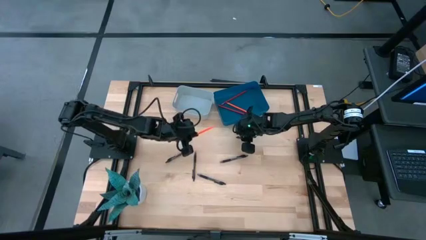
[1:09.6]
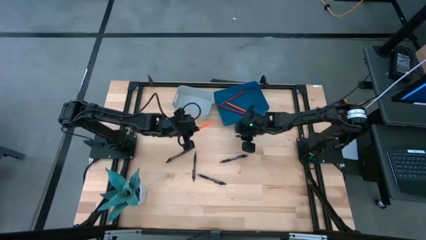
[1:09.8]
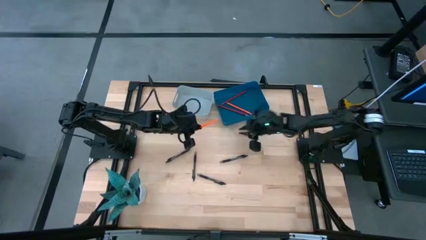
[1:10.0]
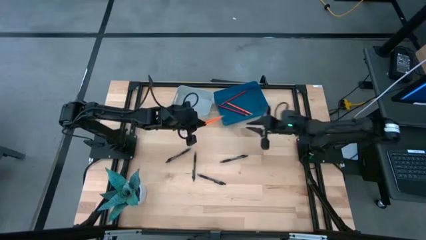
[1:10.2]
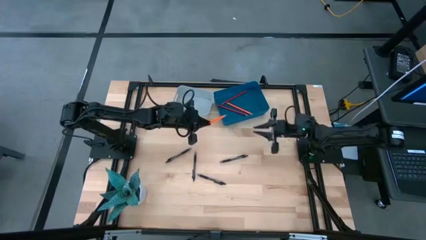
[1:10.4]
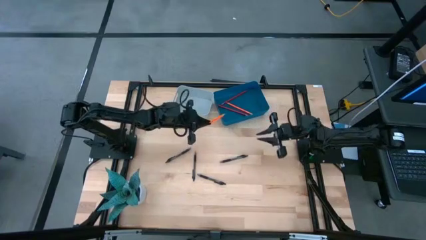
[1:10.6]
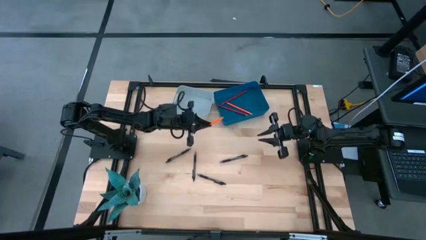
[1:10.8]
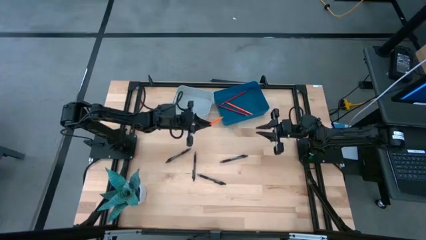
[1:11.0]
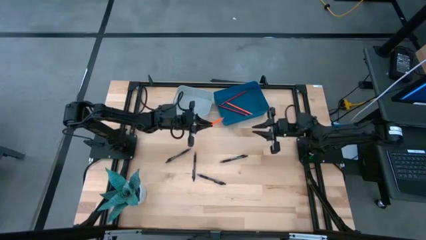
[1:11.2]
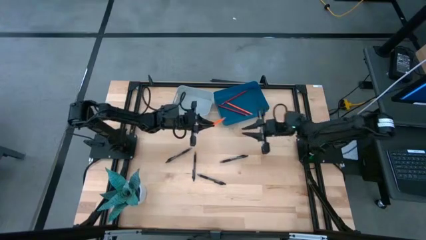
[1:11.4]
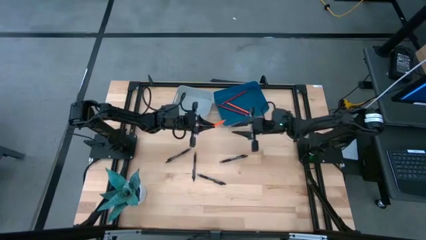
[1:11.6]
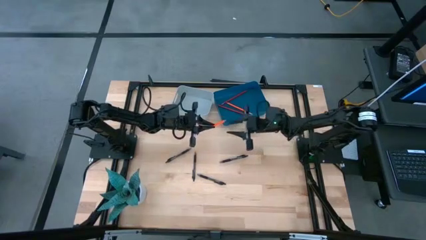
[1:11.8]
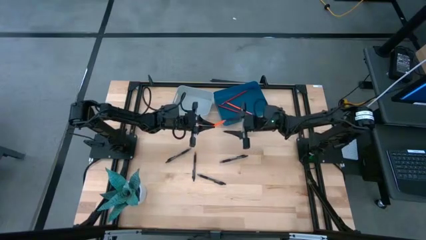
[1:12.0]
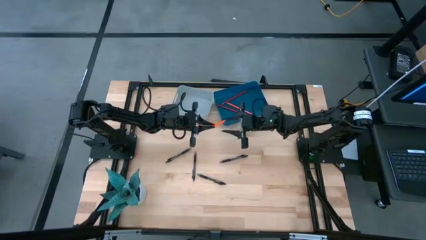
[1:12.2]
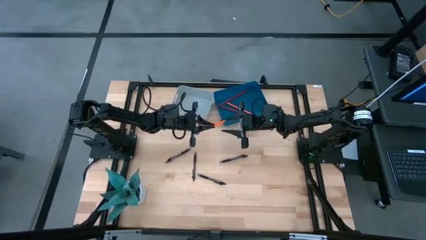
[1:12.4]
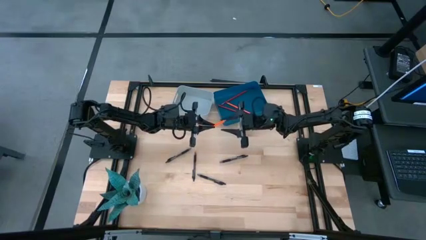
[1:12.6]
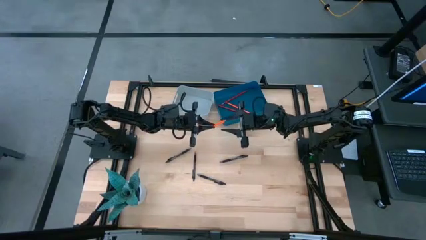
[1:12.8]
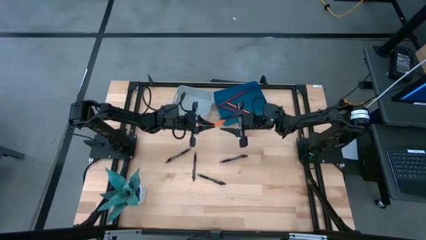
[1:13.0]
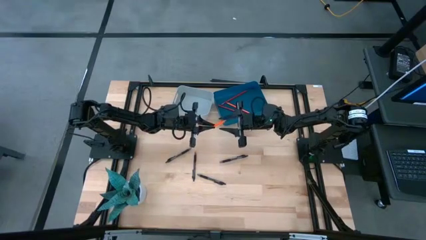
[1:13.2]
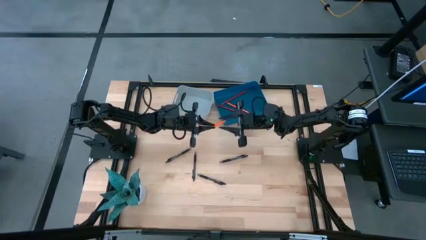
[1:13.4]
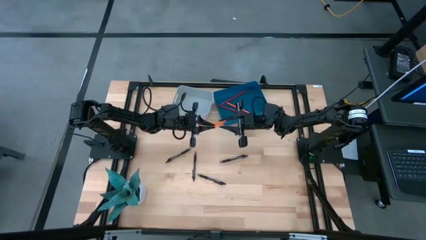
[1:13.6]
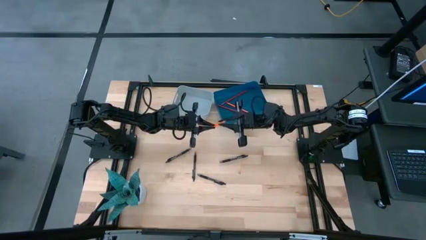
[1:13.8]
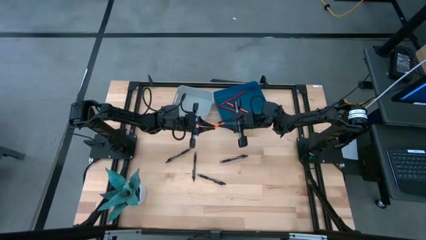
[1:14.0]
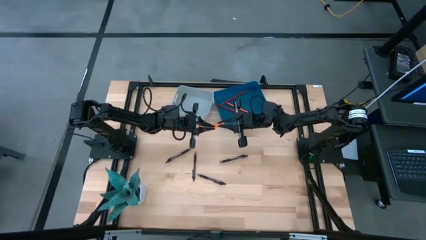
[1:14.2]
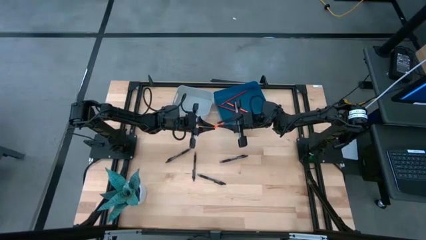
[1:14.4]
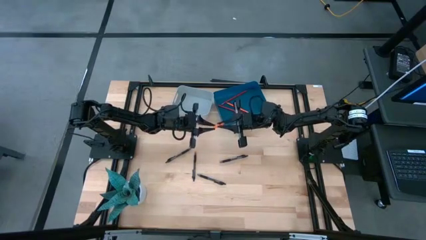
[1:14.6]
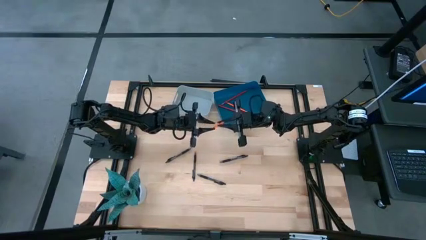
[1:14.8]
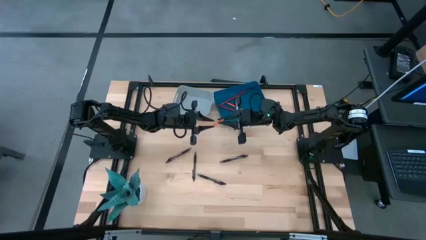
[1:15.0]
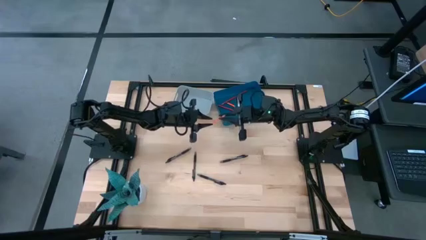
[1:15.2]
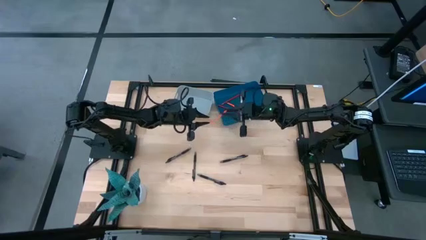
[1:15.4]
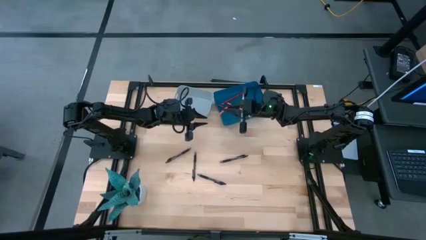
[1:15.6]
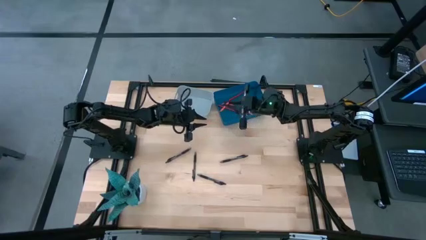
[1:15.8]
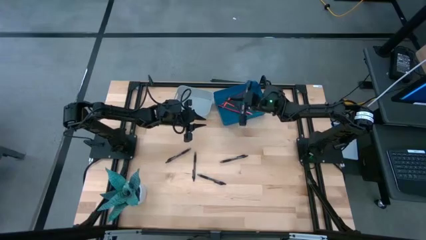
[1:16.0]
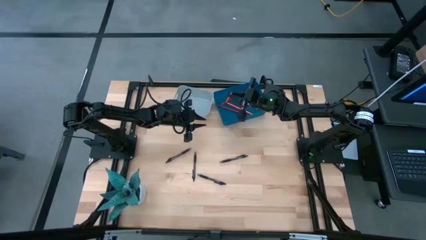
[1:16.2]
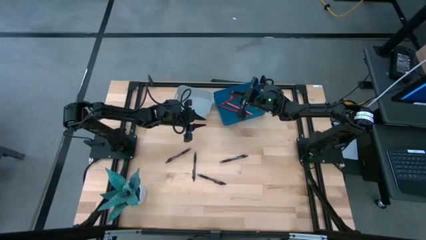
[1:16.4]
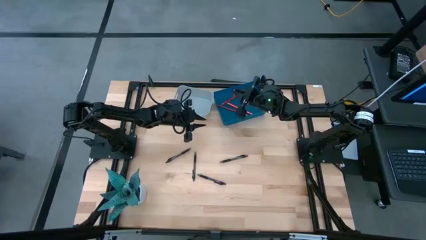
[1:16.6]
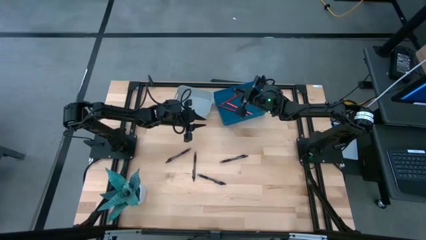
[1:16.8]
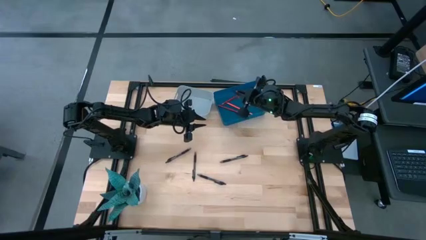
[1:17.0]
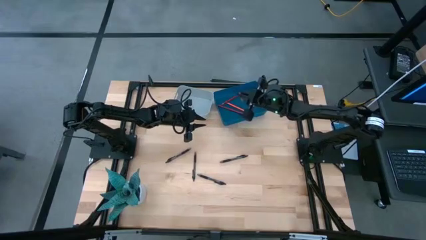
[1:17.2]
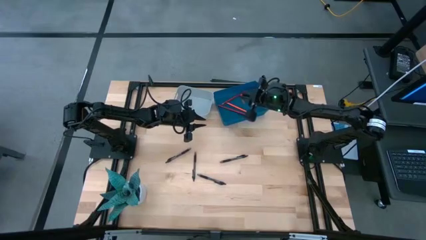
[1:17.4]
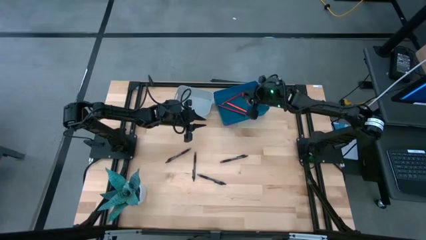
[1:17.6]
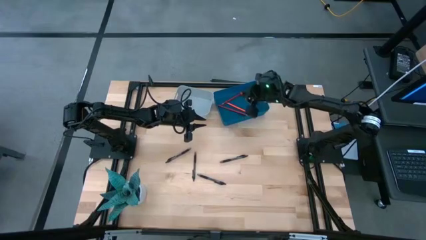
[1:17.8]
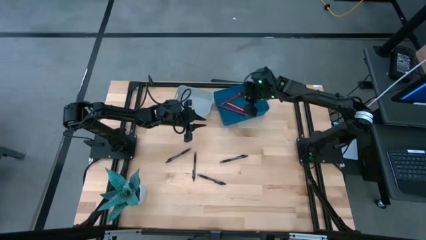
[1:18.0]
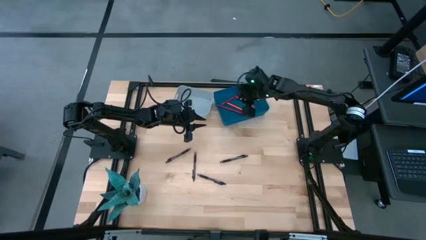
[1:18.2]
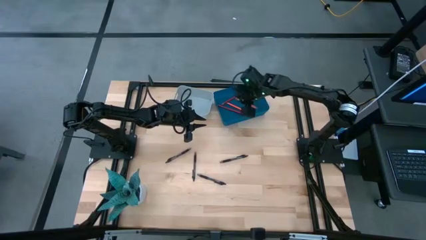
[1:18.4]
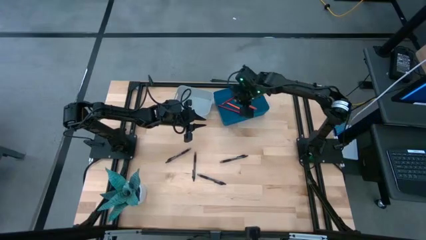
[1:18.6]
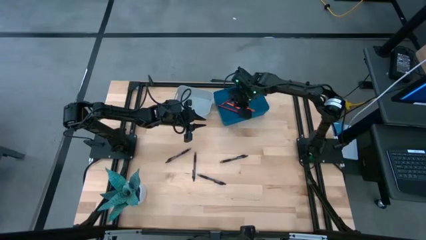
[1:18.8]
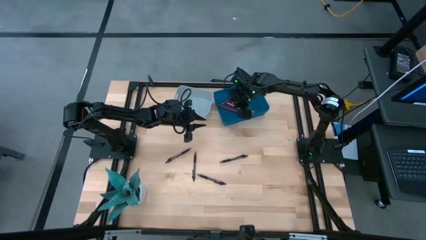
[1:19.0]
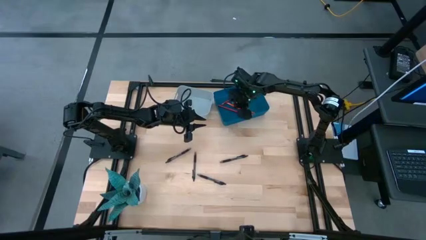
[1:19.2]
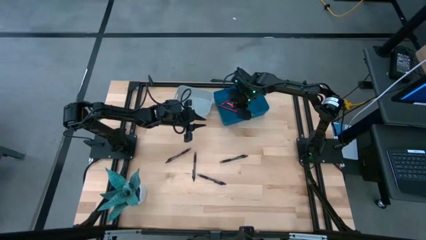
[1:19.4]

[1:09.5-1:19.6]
Task: Sort pens & pencils
Put the orange pencil into the blue bin

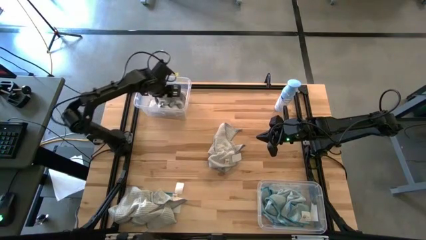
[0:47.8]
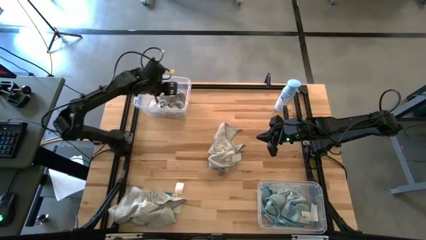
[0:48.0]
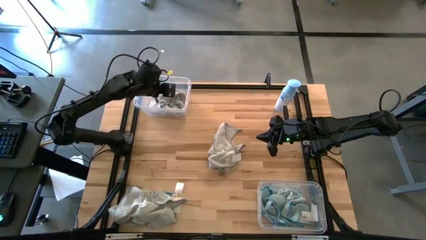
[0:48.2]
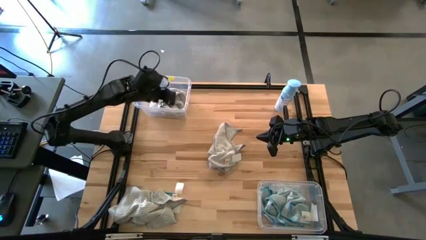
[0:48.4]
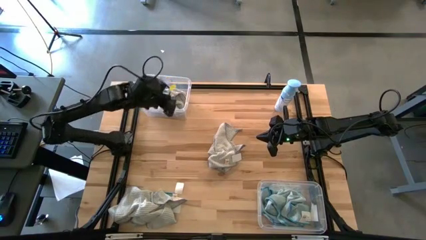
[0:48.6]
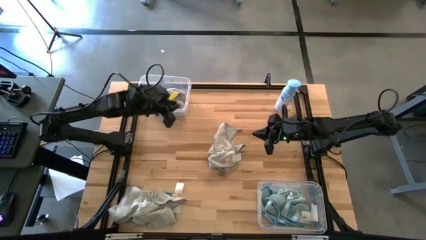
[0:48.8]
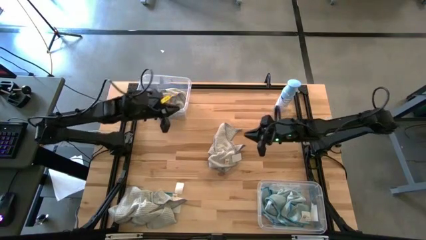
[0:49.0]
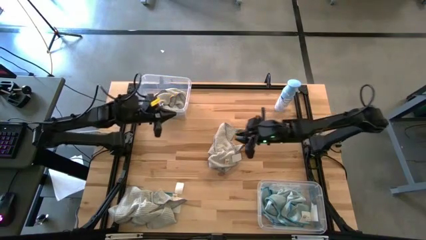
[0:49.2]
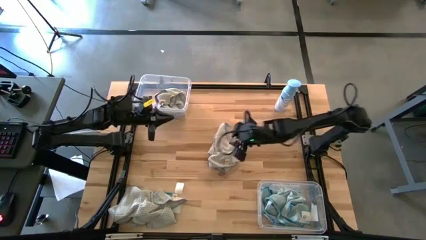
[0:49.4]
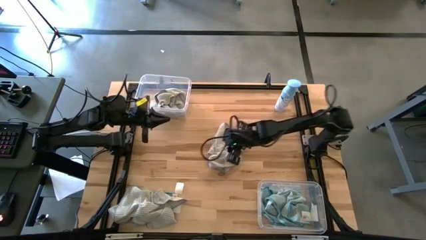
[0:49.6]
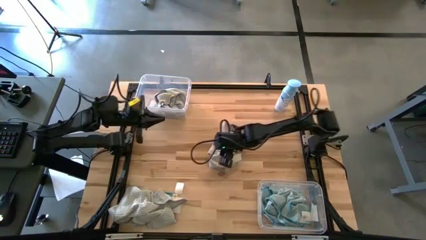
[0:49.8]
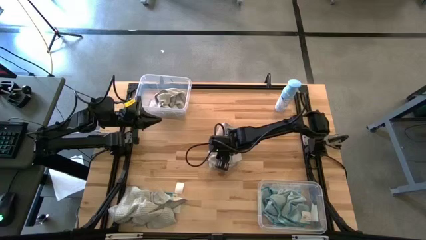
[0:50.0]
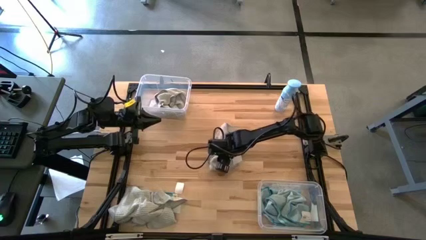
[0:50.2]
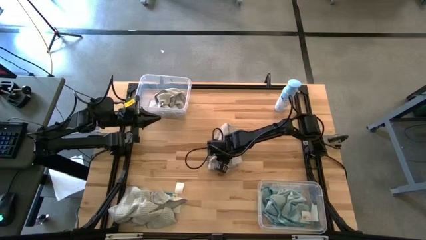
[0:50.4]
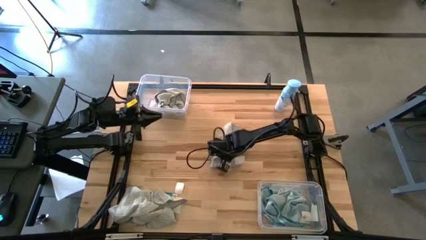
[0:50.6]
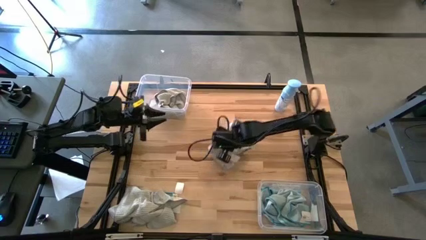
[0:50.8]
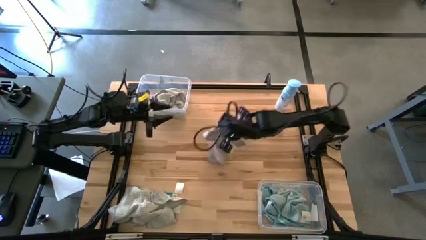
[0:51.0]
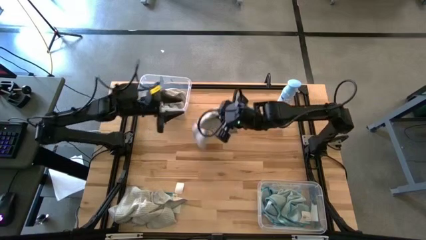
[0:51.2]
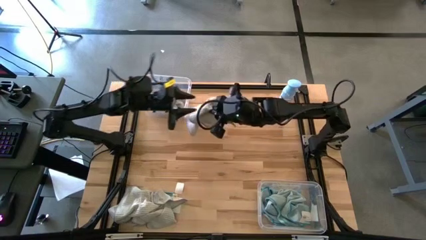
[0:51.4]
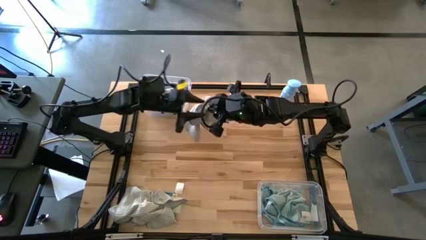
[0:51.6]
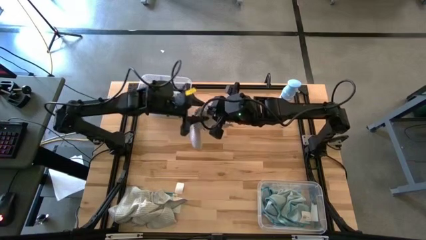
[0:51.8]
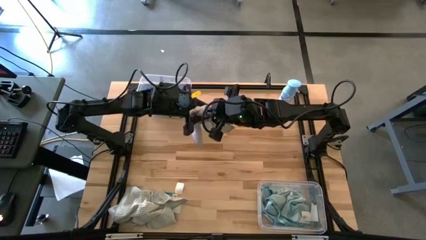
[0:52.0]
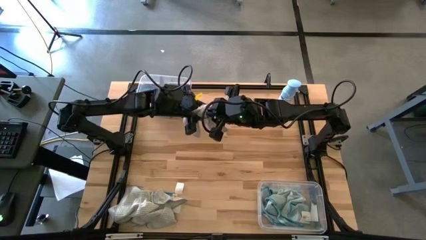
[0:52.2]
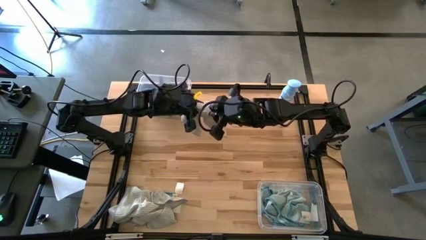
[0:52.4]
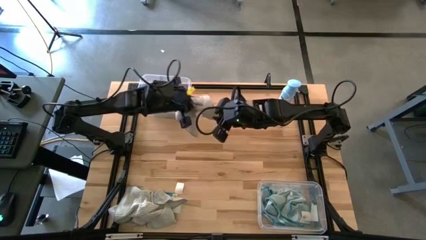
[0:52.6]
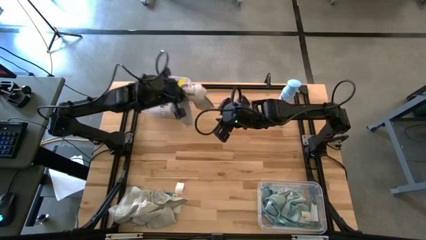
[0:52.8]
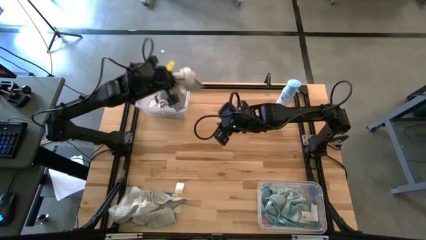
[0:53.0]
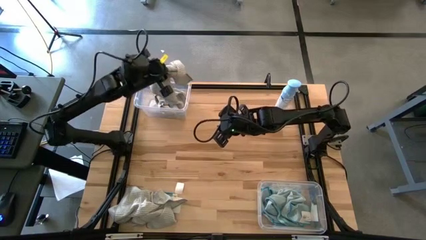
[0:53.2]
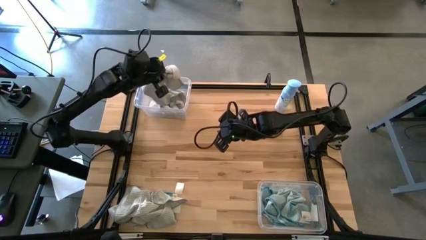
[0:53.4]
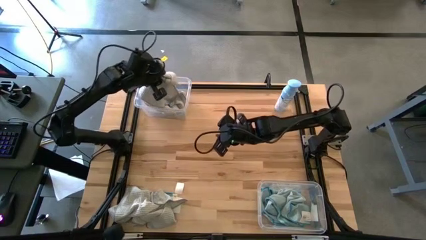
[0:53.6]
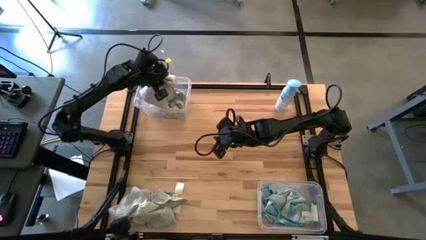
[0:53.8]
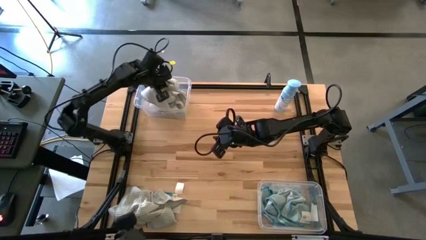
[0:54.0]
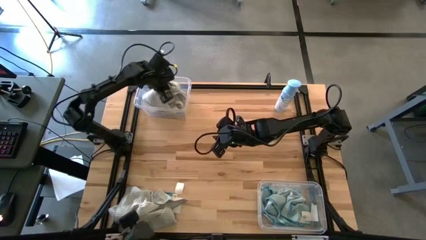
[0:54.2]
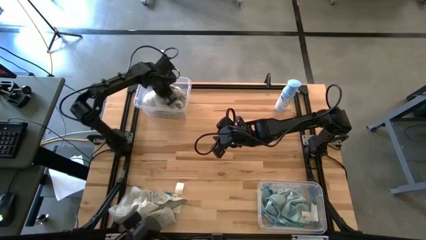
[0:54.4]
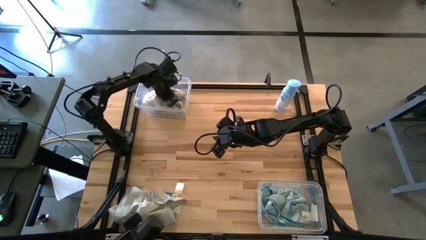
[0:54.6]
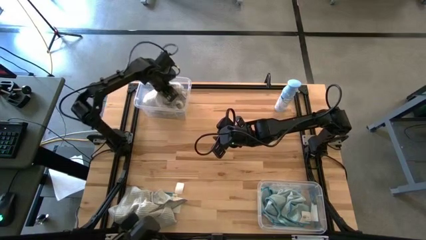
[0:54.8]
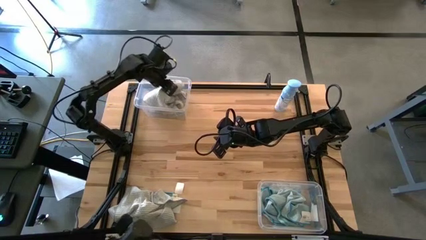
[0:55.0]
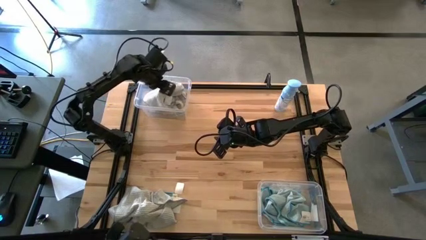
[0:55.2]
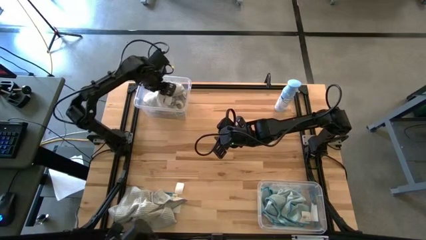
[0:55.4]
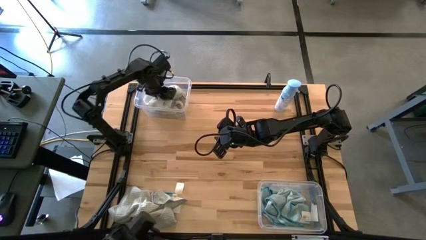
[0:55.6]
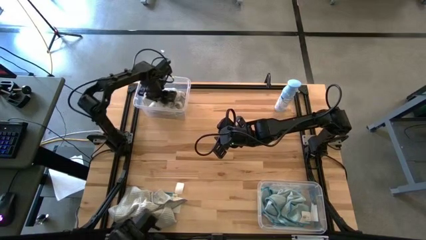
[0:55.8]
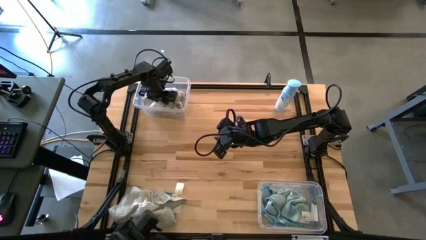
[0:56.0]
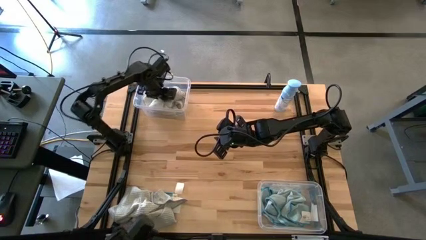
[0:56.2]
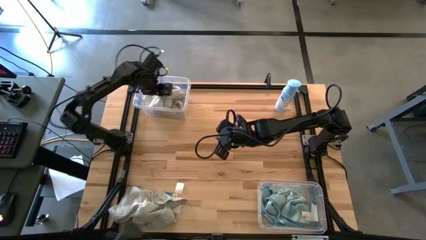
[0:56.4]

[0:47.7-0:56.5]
Task: Sort microfiber towel by color & place in baskets
Put the top white microfiber towel into the top transparent bin
